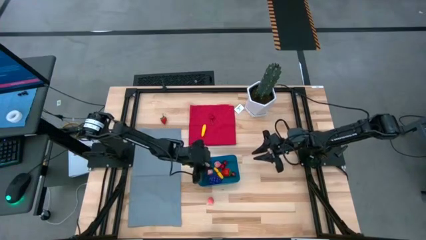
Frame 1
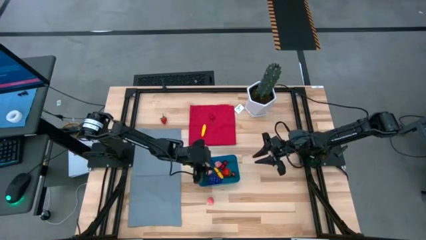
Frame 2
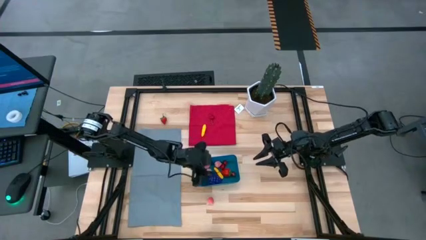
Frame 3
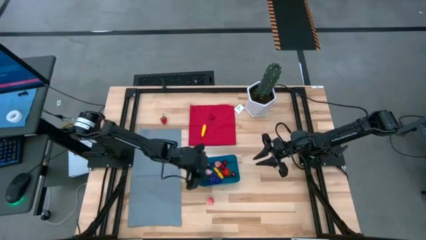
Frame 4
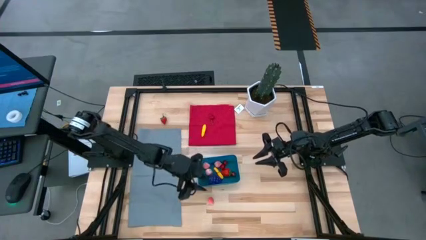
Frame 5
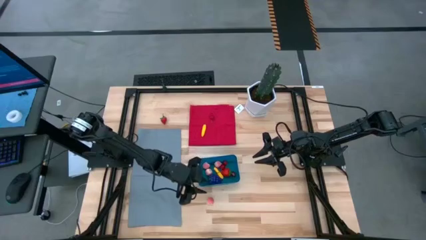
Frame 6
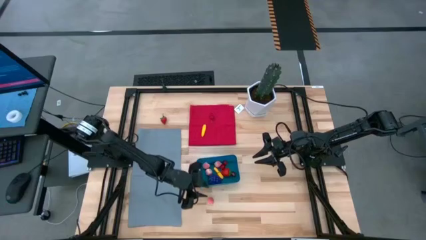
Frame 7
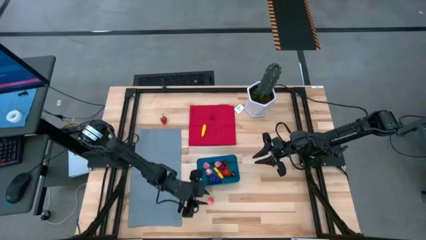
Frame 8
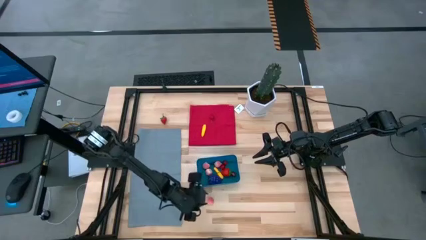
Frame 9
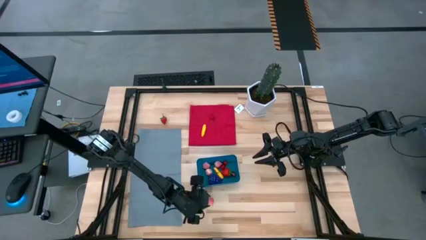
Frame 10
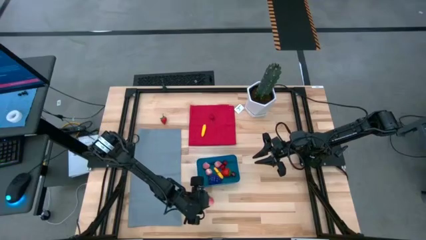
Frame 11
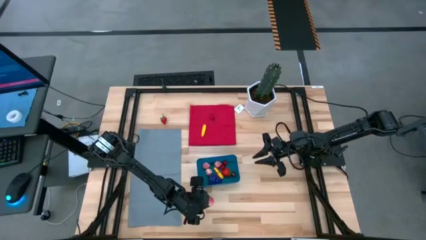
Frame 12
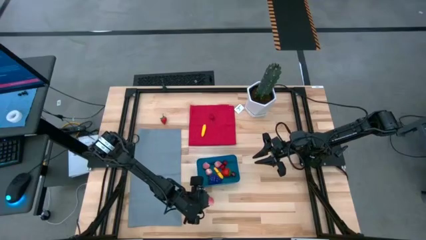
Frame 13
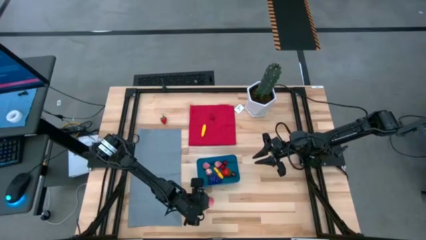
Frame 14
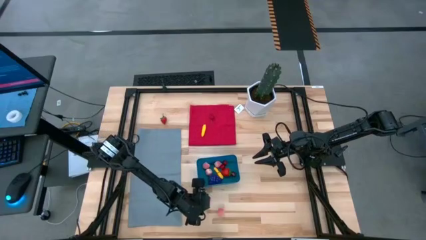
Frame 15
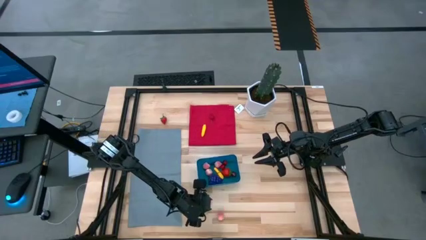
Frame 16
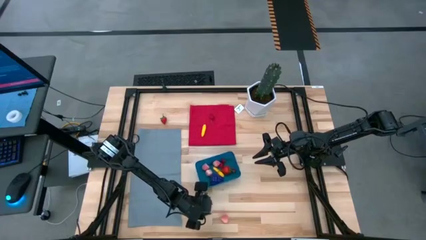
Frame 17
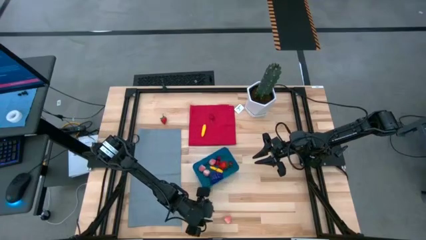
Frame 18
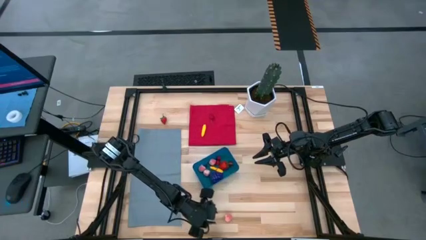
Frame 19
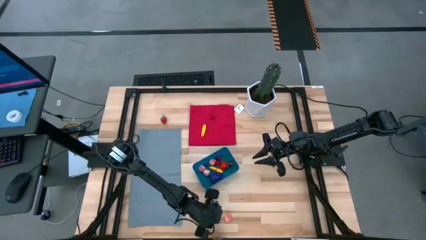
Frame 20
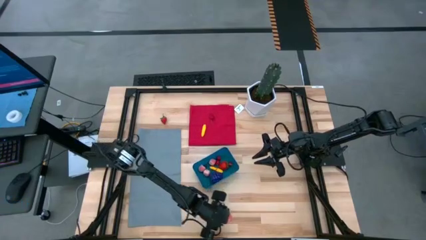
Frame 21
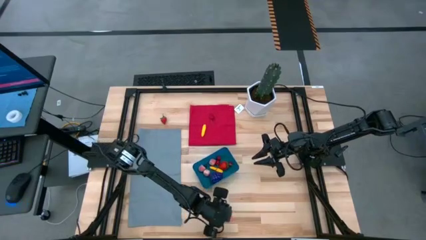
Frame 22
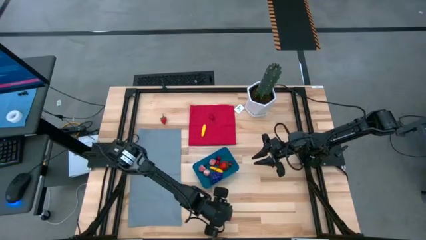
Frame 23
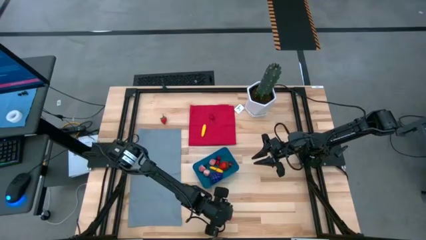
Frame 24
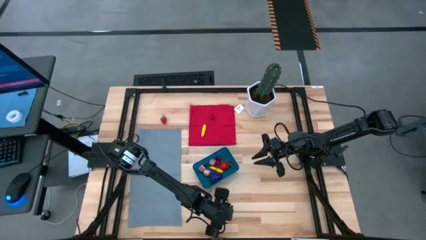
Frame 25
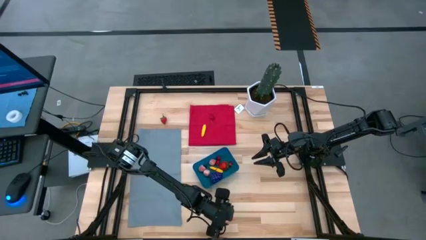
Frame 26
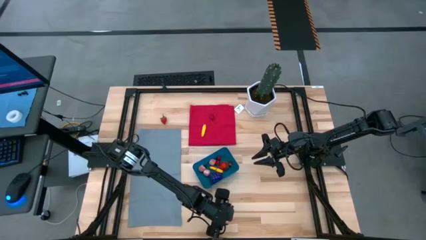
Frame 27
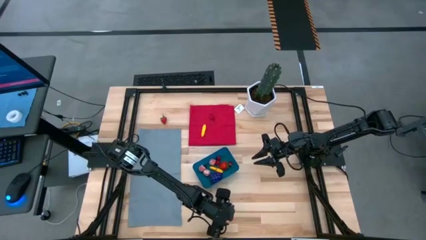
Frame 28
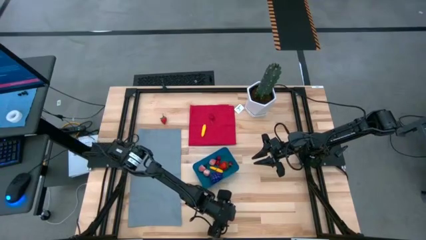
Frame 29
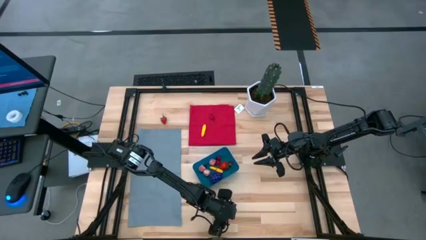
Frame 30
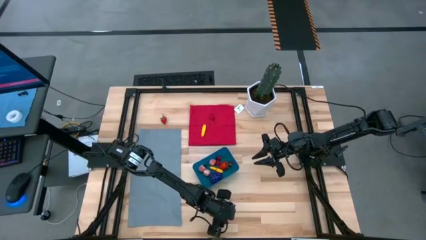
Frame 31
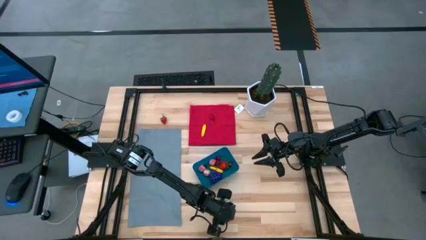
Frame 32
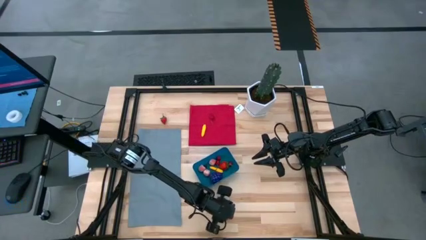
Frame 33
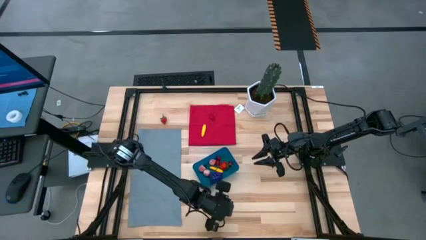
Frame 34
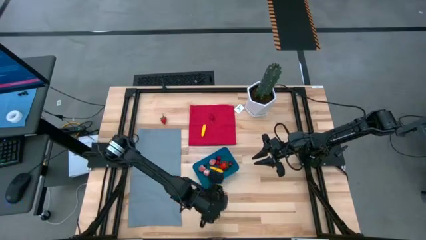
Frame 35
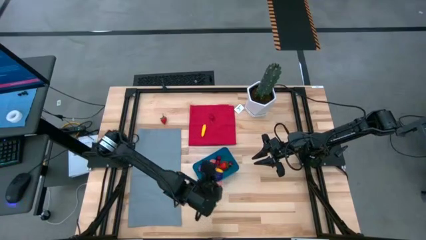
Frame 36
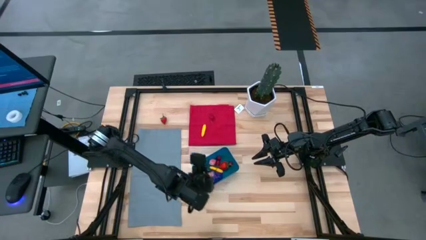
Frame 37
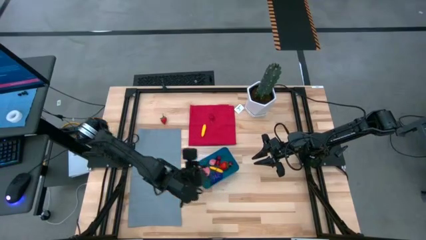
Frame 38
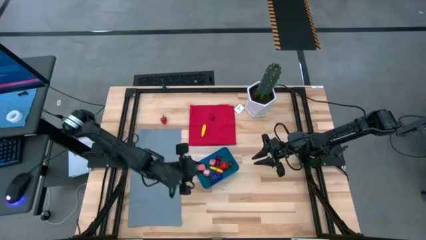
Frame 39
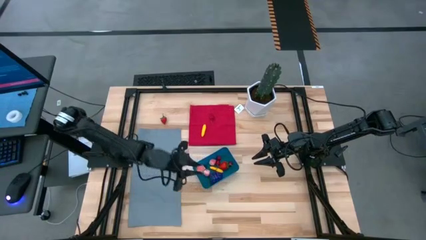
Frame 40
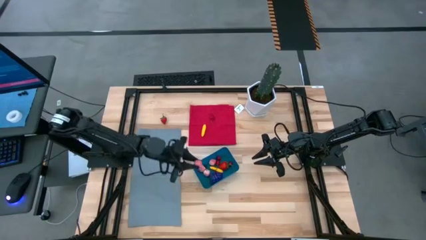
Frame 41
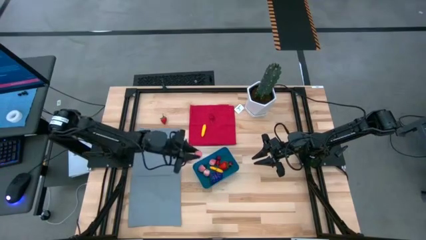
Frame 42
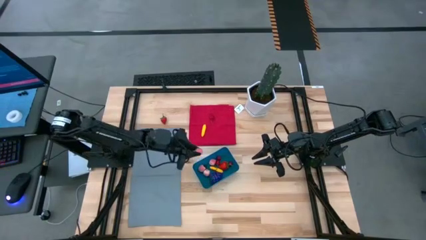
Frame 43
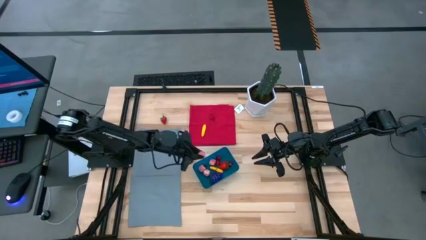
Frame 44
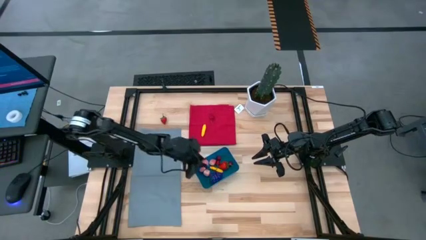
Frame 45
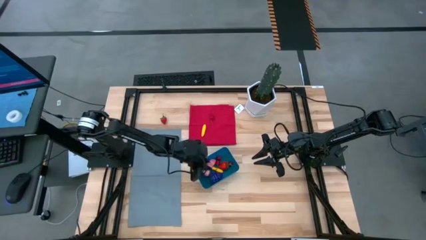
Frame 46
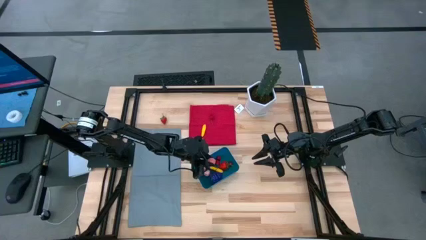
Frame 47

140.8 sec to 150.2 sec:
Task: Pick and placing Produce into tupperware
Put the peach into the blue bin

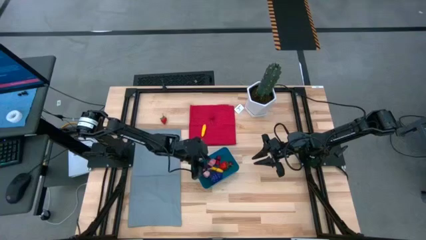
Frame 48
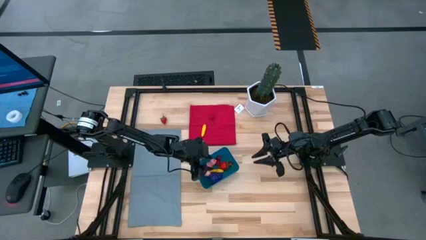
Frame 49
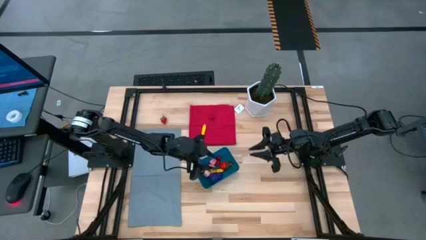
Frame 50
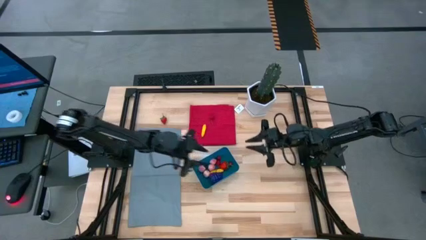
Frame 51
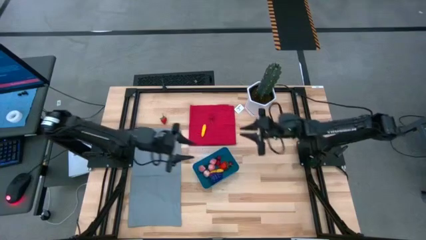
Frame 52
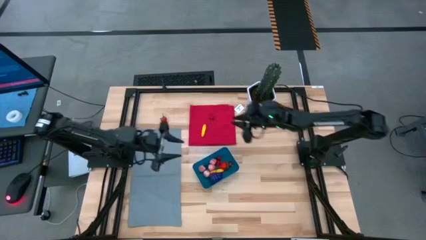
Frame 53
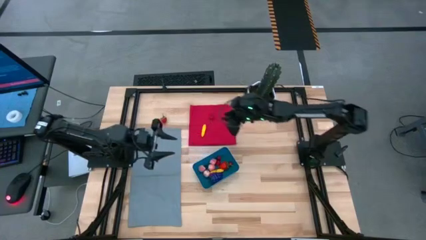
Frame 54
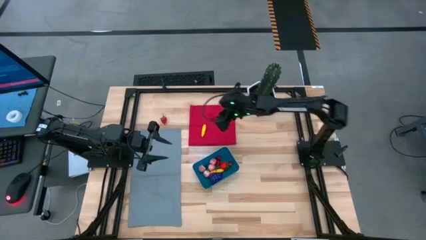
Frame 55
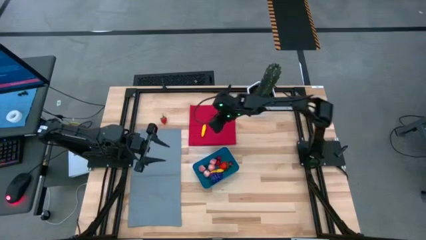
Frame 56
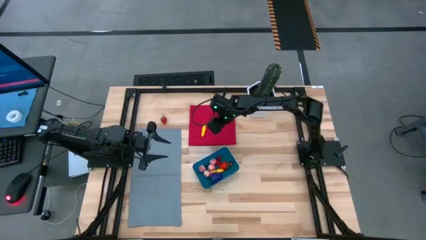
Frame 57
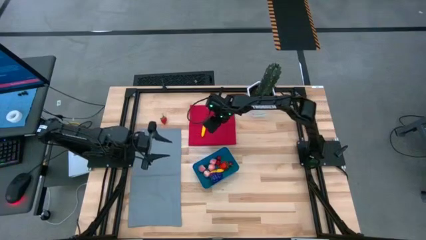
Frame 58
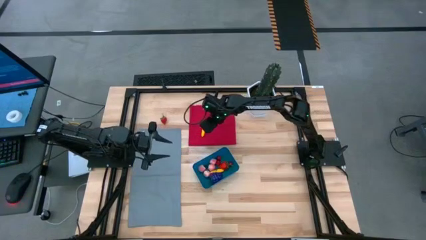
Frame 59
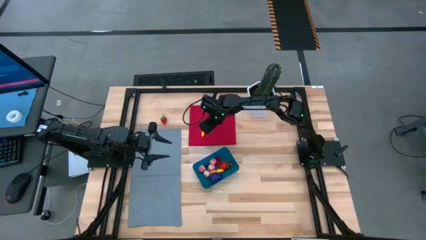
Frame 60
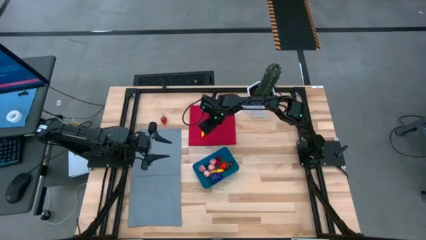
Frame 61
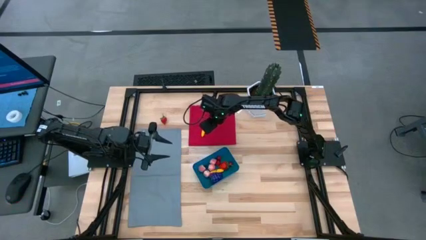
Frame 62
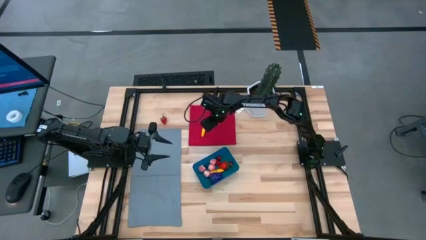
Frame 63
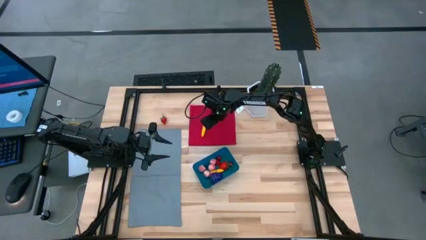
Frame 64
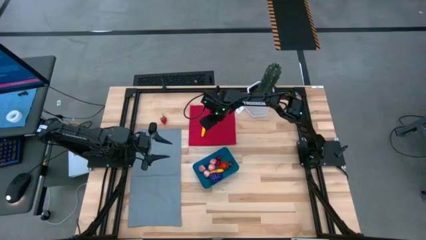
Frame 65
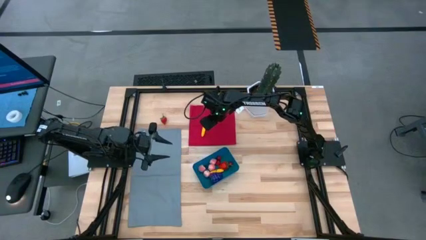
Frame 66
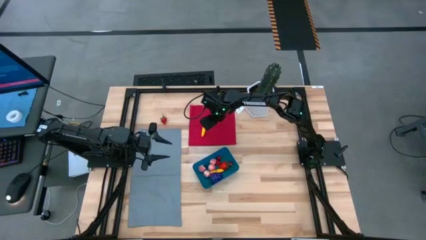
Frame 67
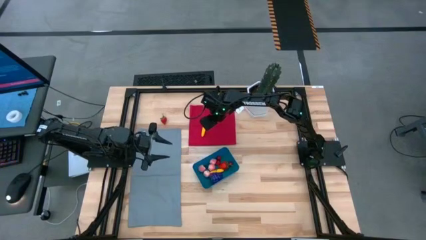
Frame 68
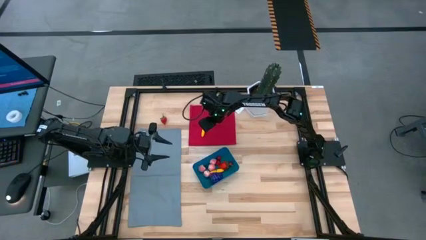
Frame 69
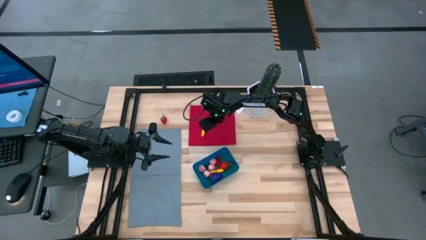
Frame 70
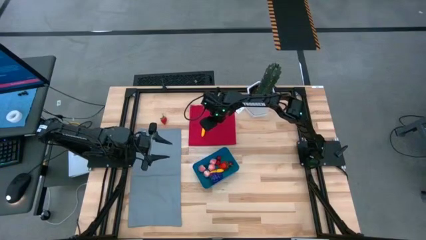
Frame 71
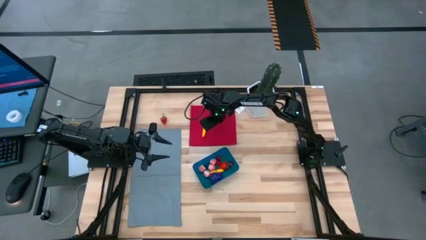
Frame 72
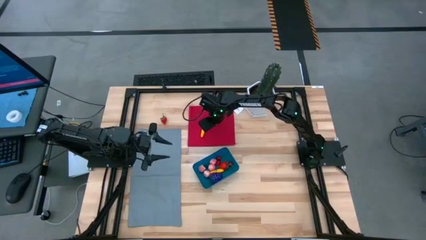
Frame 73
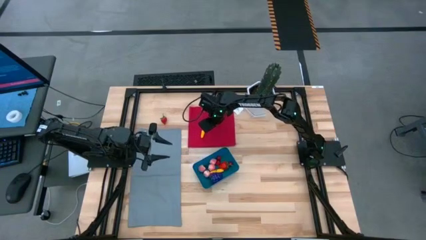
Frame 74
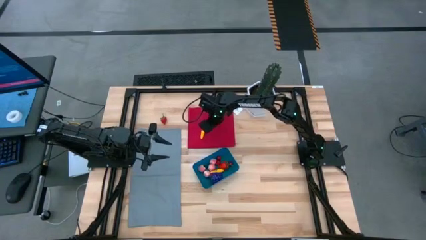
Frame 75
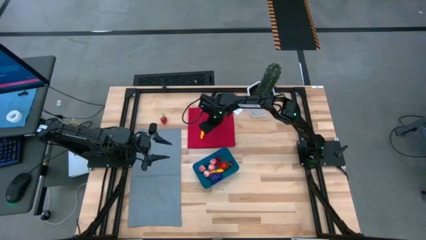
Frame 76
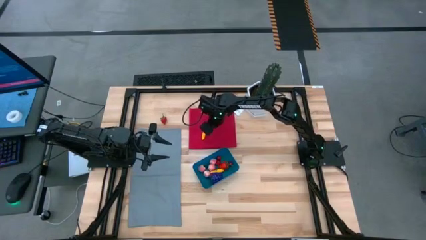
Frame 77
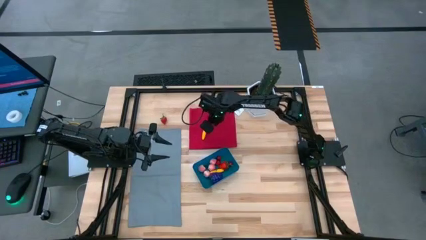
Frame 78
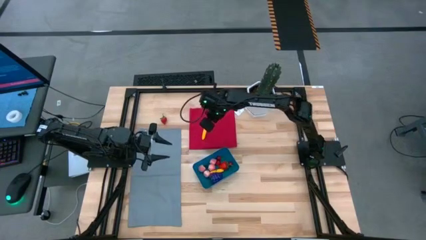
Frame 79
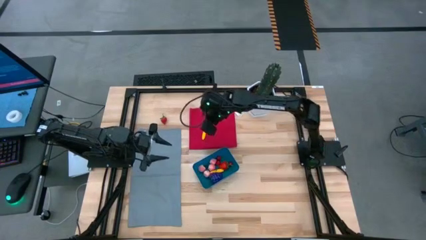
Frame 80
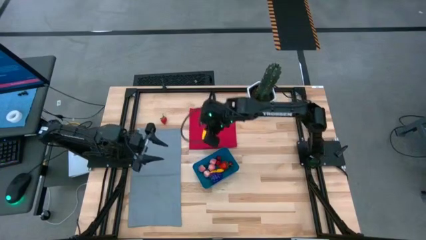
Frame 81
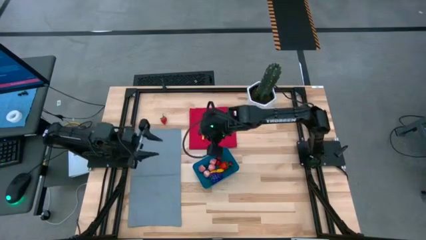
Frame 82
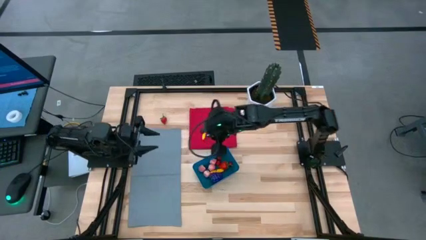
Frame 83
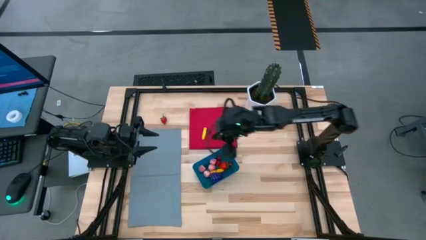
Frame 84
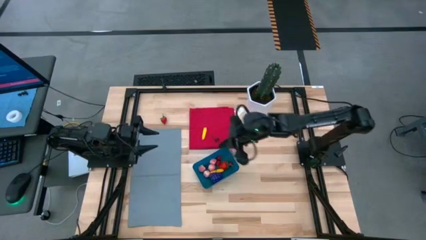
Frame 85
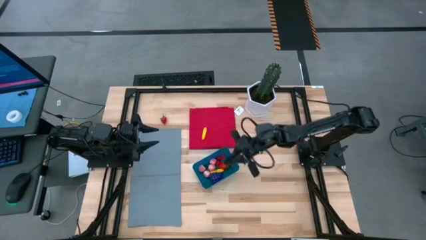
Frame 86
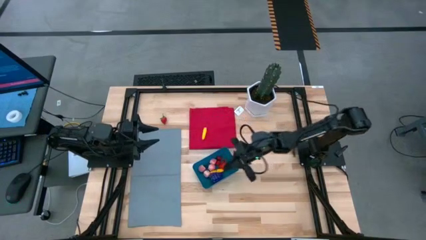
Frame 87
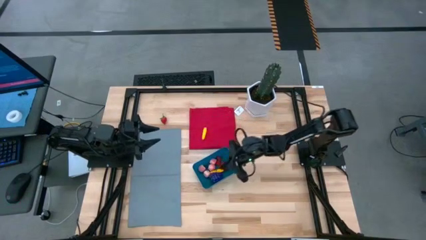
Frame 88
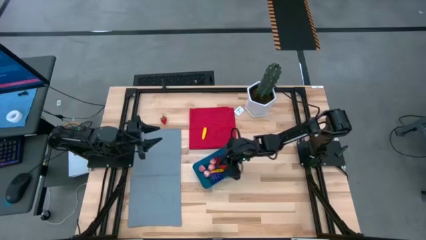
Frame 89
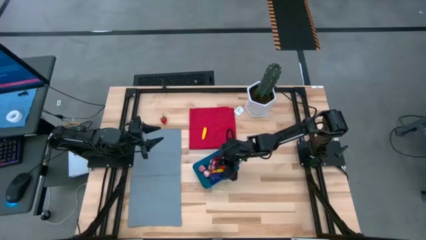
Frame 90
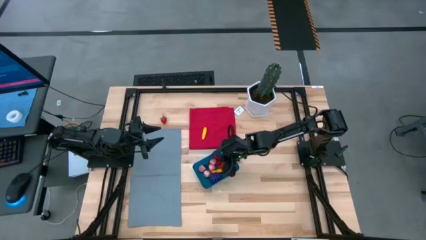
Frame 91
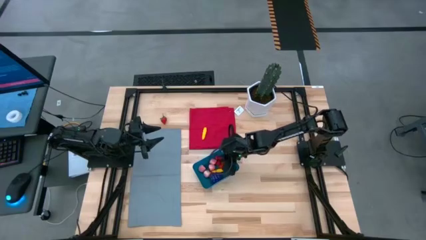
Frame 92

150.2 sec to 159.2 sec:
Put the cherry into the blue bin
